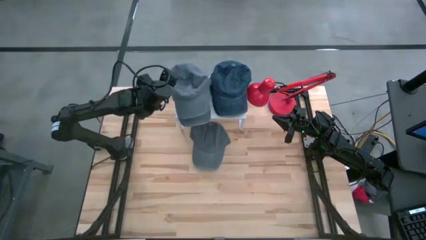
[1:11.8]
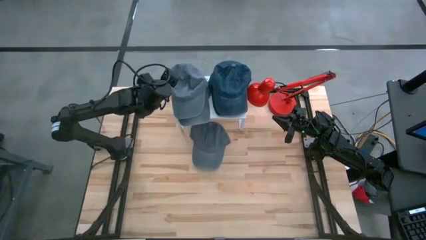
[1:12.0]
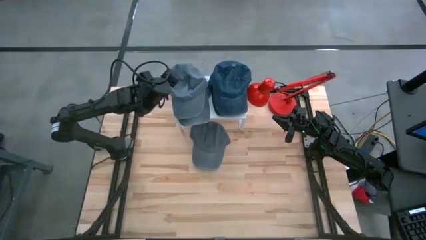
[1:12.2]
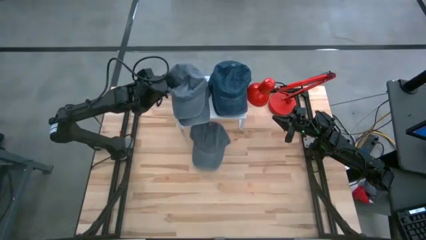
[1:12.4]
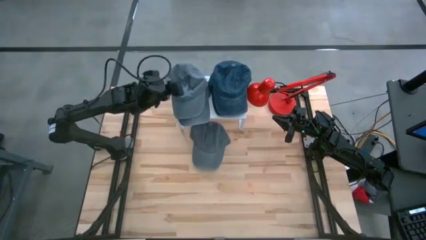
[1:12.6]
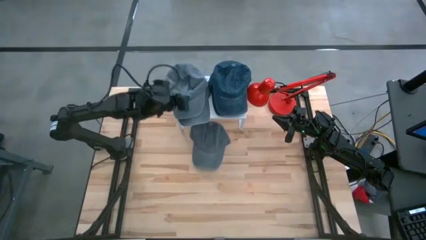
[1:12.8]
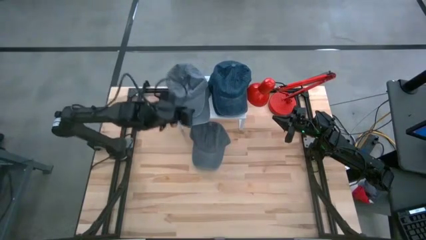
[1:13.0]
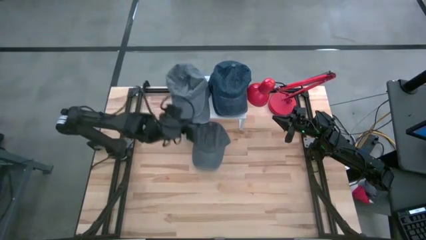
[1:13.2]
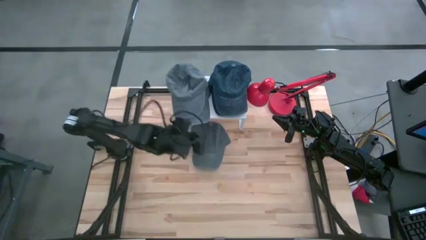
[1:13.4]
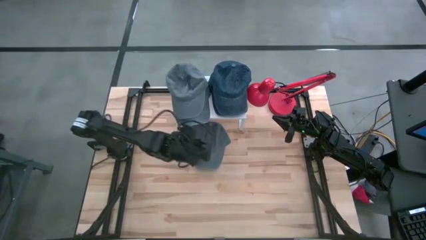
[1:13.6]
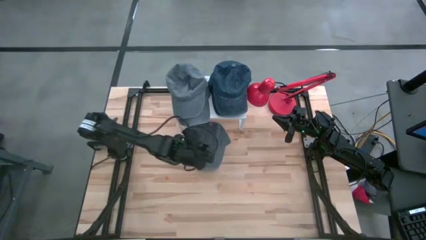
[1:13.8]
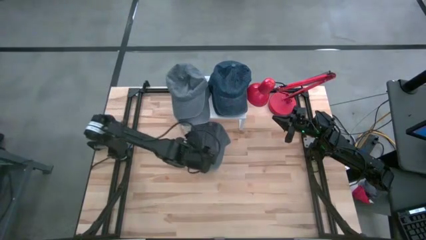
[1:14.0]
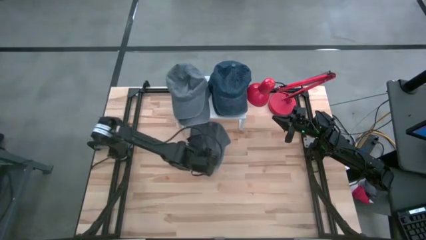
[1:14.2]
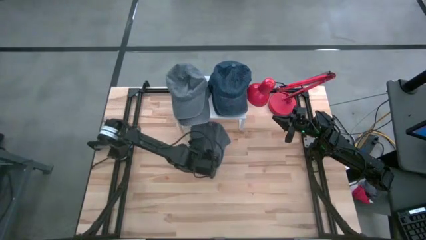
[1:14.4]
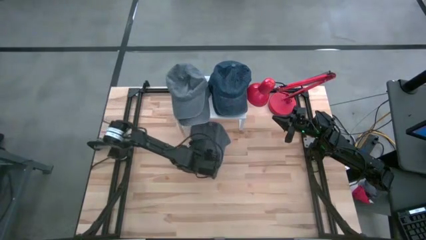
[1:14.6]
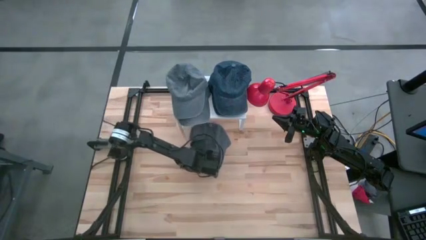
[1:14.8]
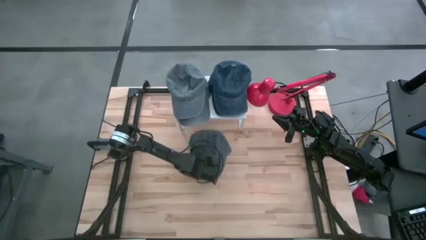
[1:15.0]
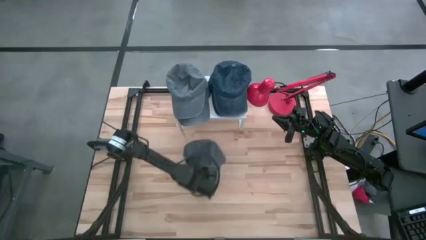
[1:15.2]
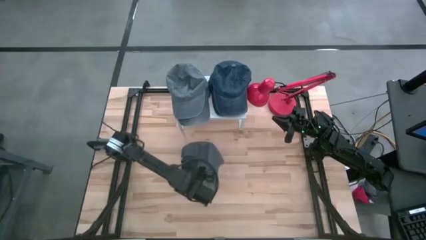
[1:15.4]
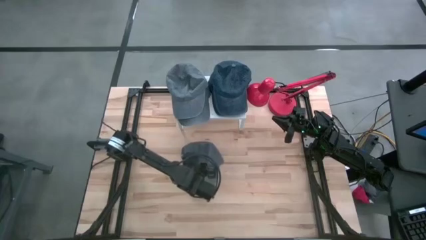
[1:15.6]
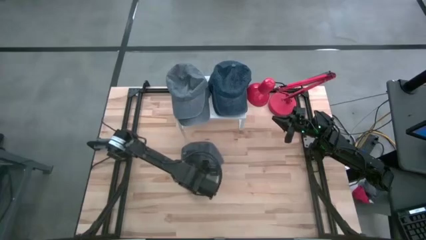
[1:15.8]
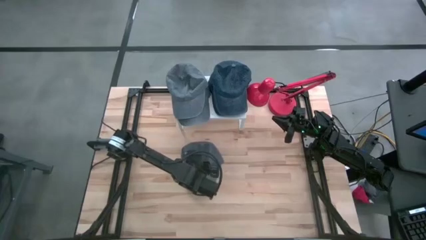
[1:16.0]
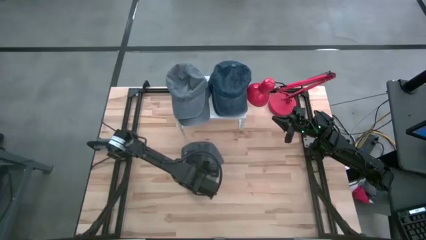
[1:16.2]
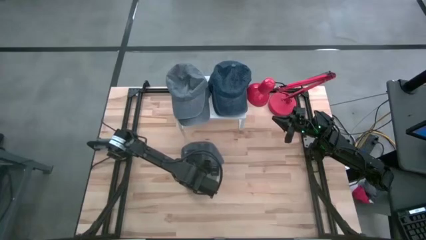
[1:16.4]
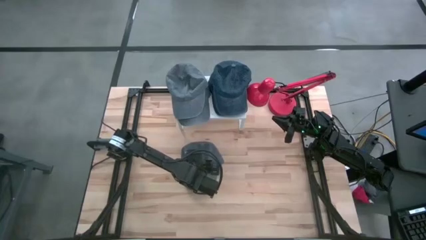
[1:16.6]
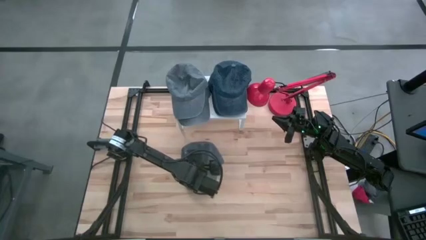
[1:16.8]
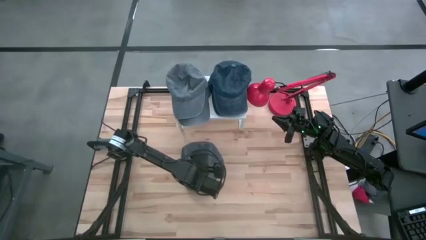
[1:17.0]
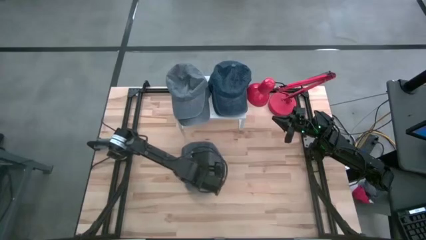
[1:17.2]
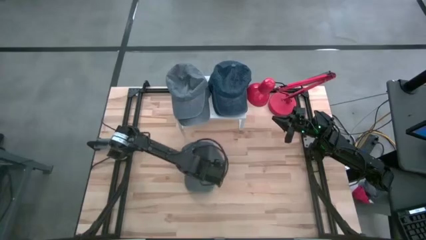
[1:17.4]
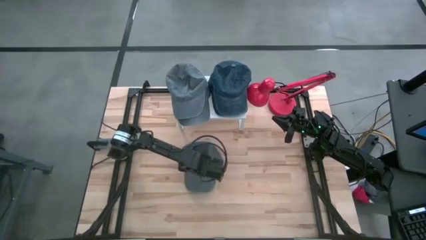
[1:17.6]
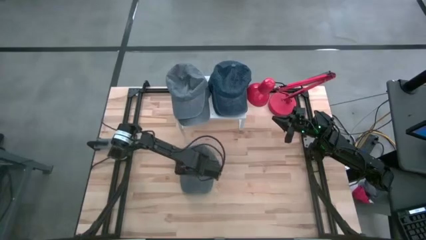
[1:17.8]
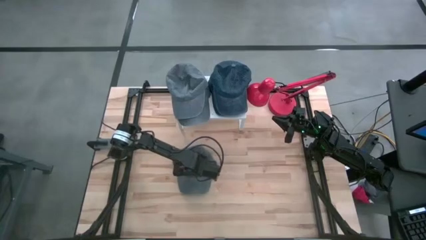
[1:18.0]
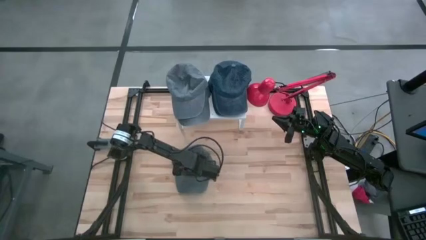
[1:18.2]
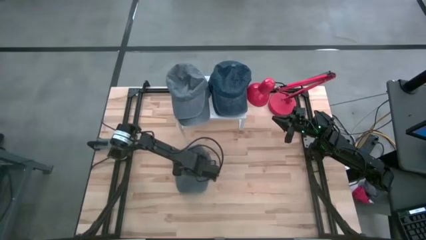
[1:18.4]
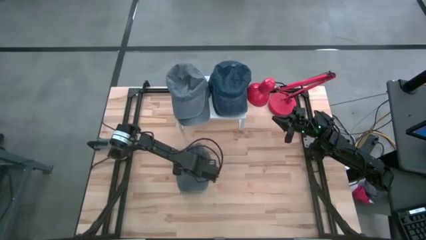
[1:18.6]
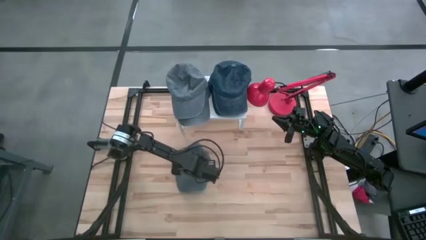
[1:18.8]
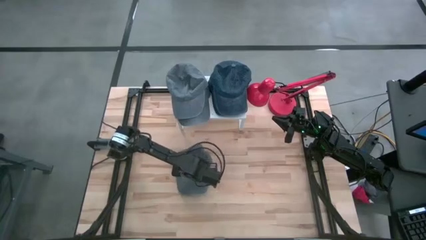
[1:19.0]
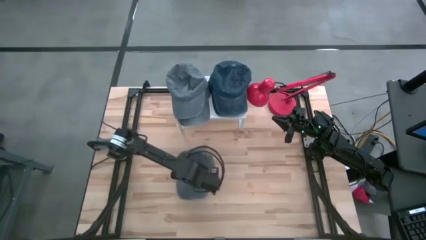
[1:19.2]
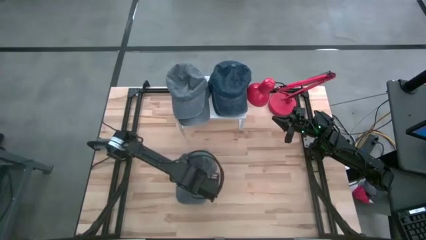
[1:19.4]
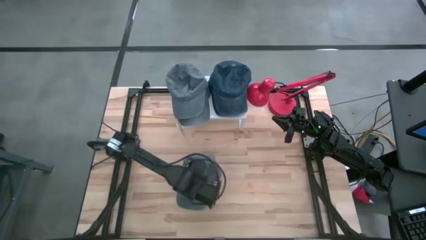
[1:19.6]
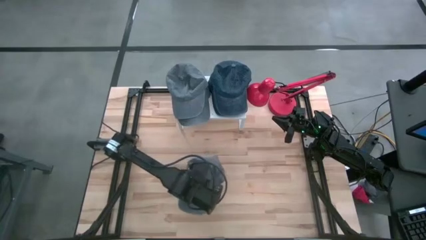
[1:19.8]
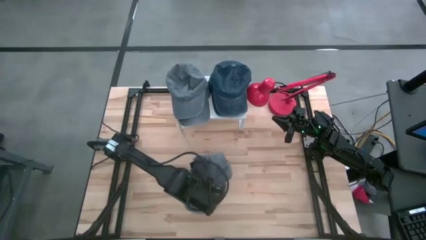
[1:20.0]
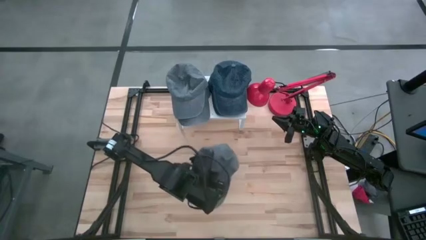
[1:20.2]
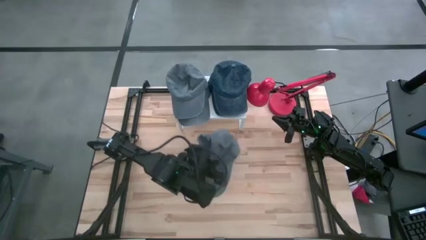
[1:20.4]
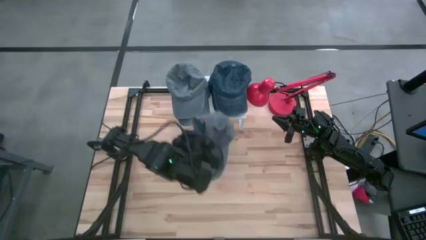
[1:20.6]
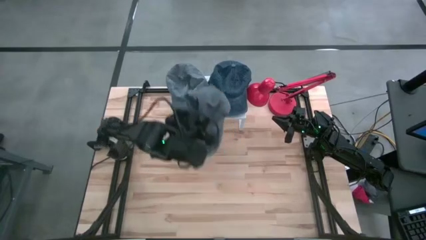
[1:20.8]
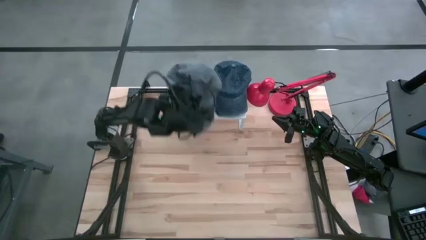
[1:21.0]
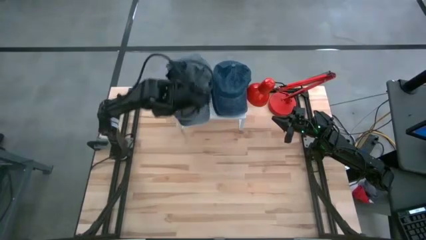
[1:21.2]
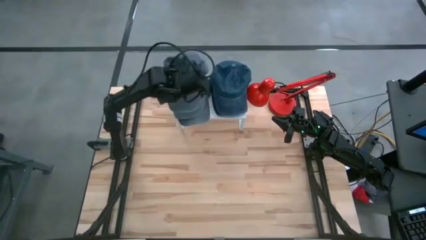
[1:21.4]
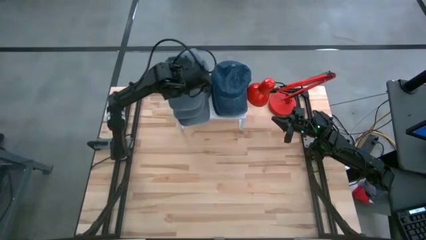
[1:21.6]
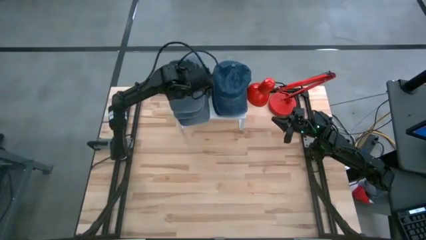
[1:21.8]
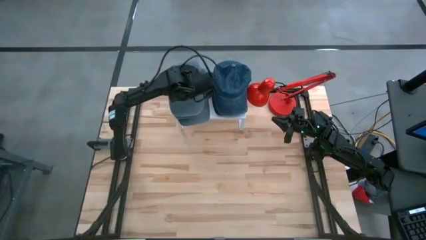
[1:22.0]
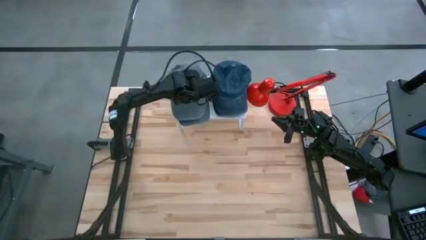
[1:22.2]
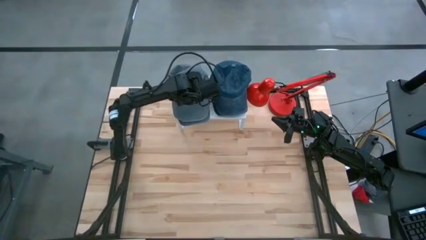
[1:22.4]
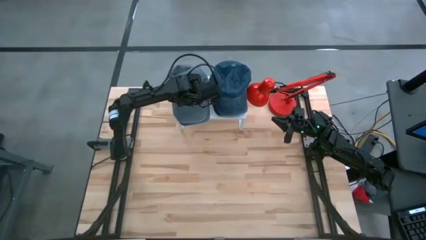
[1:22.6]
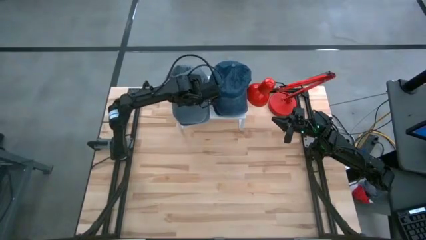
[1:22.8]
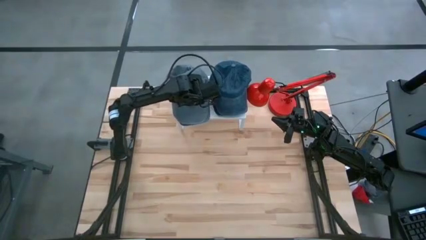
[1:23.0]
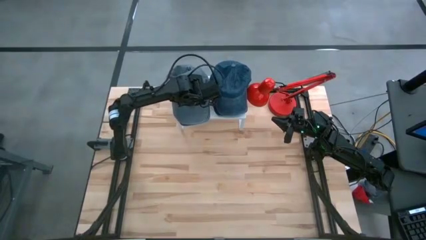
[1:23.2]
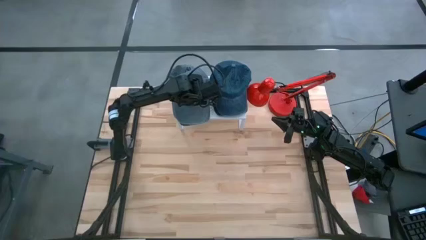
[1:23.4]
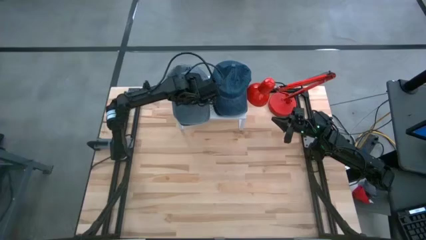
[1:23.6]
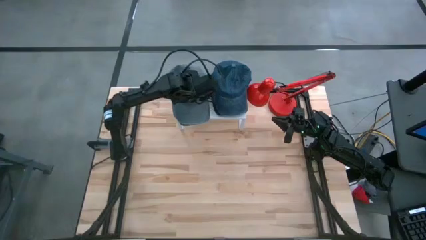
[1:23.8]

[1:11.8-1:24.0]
Task: Pick & Place hat
Stack the gray cap on the stacked gray caps on the shelf

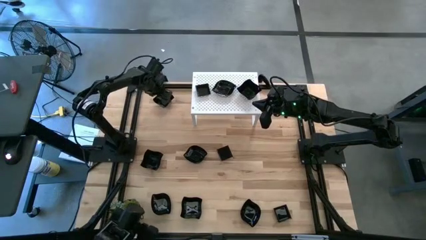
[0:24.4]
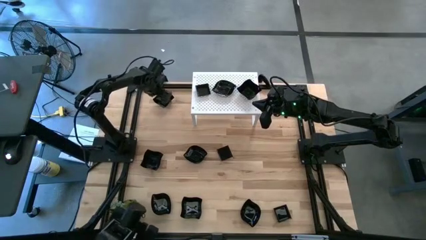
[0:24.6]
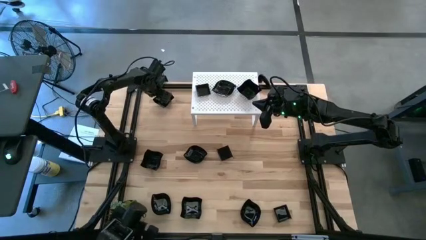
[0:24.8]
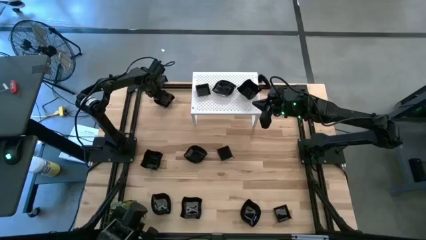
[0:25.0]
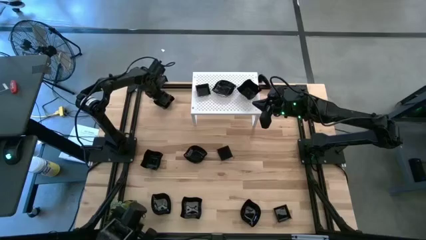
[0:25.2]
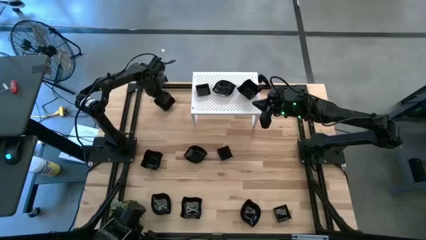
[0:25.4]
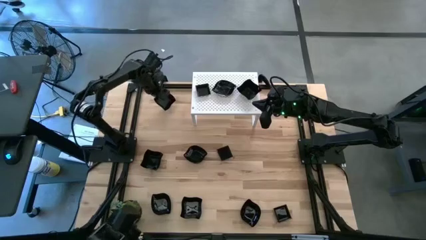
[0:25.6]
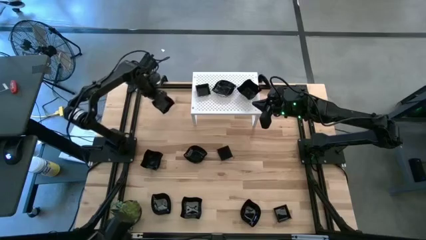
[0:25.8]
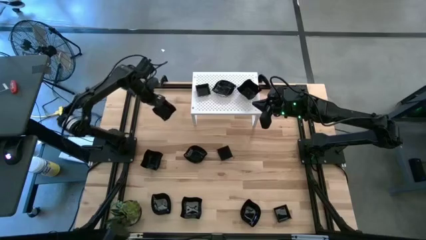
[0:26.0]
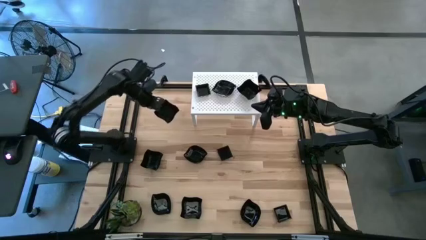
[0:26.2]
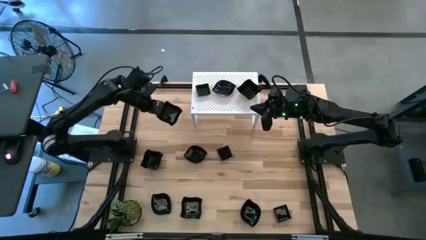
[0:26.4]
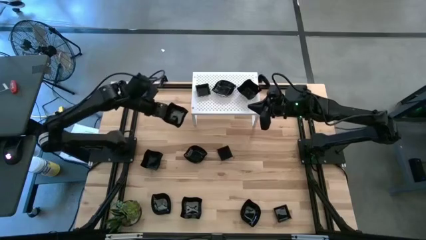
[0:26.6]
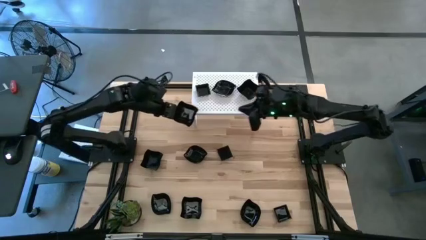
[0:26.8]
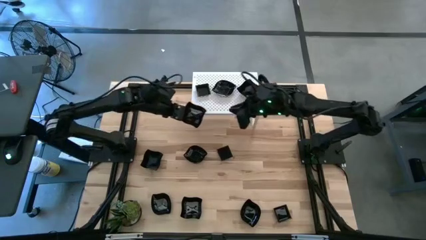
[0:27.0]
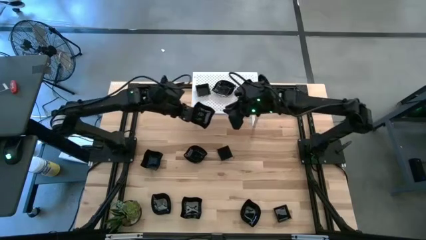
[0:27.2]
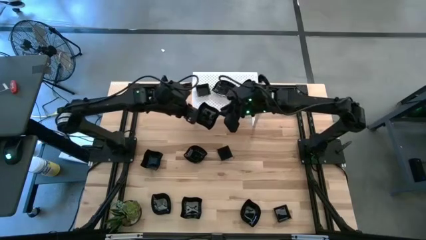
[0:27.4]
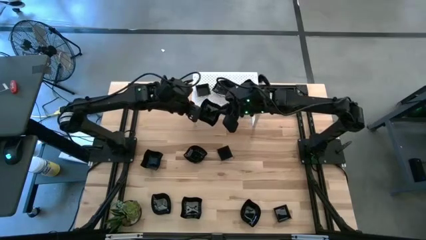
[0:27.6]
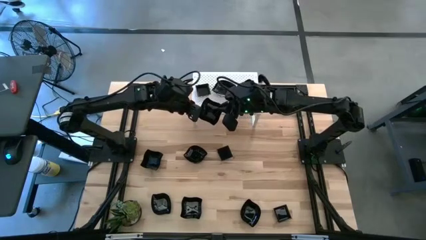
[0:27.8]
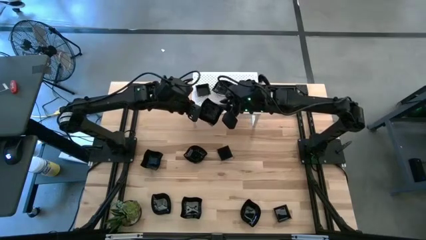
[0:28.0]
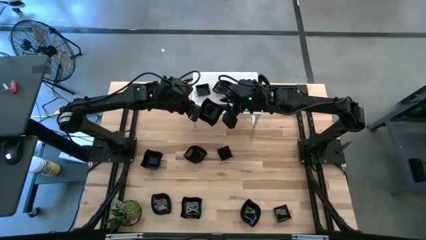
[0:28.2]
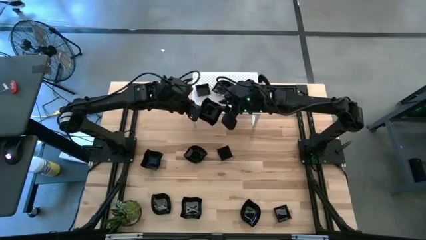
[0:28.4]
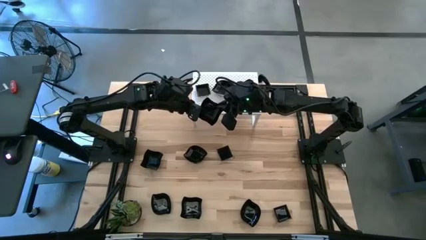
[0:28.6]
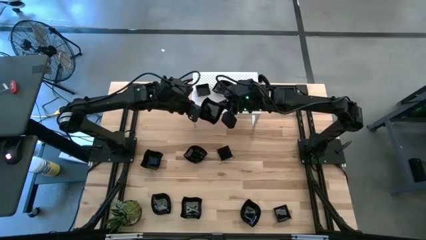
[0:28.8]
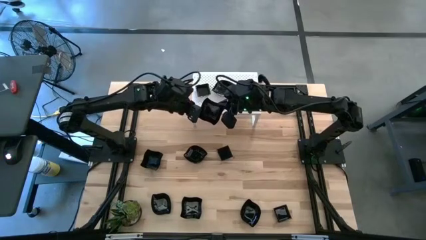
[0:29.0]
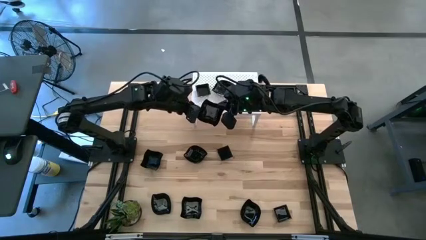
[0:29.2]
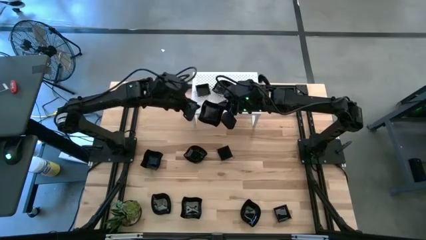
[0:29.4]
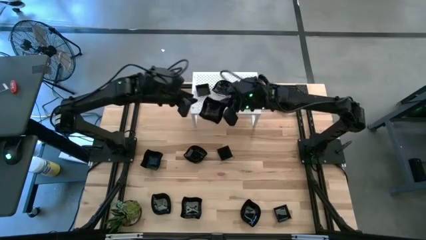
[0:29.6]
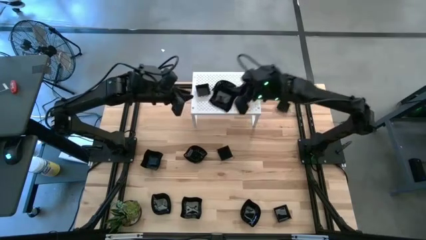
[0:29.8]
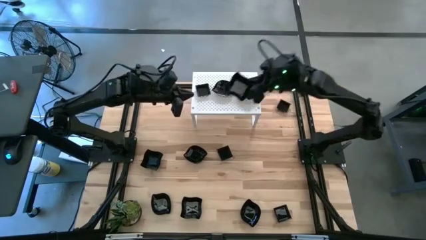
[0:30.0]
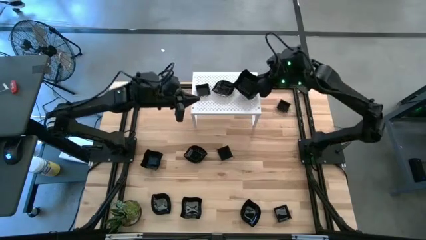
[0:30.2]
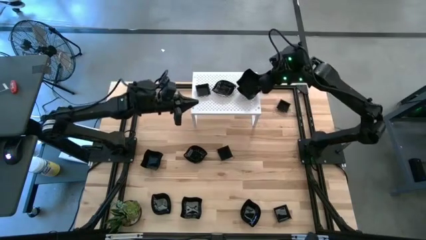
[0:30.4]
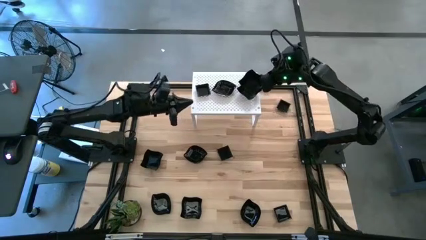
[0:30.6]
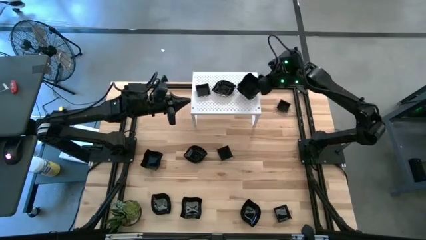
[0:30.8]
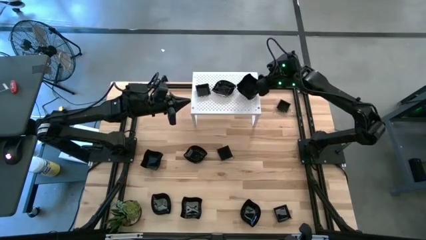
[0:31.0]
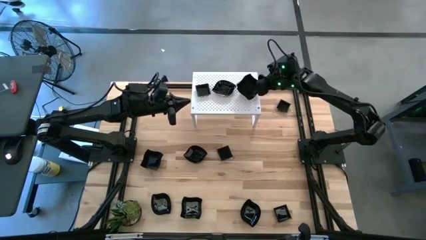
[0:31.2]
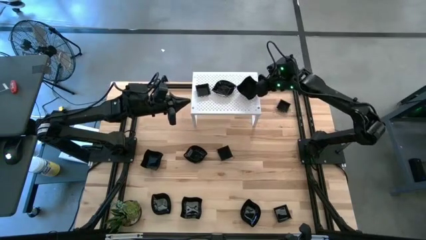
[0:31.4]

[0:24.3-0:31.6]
Task: Pick & Place Mini shaped plates
Stack the black distorted square plate on top of the black distorted square plate on the shelf
